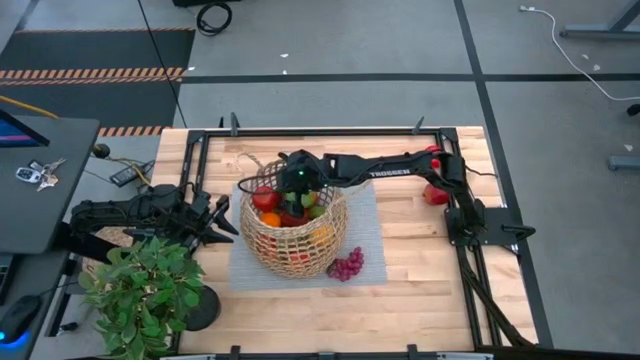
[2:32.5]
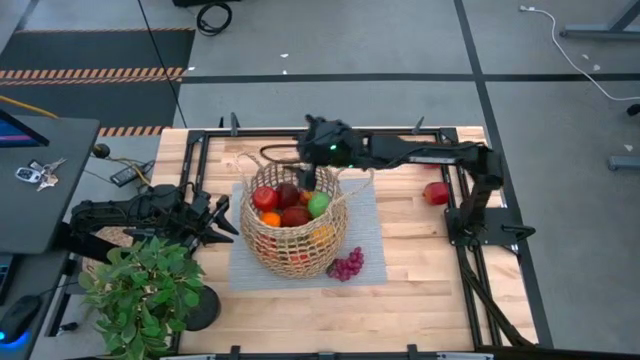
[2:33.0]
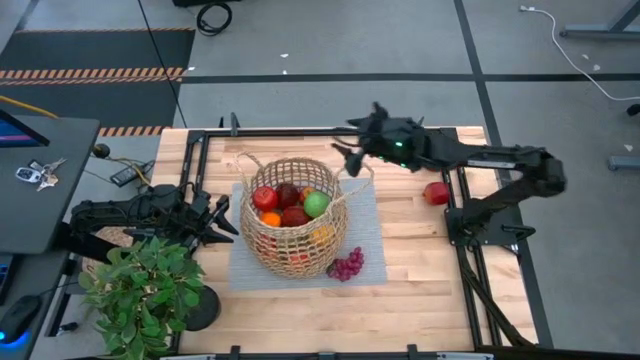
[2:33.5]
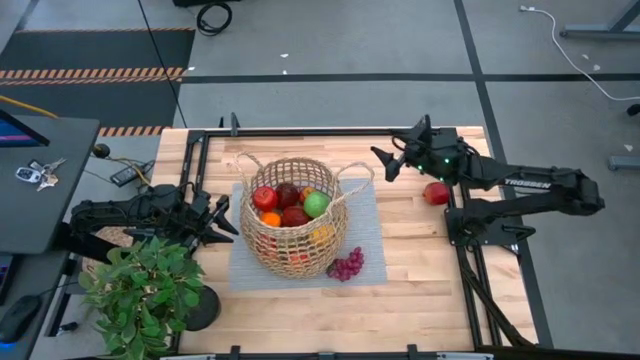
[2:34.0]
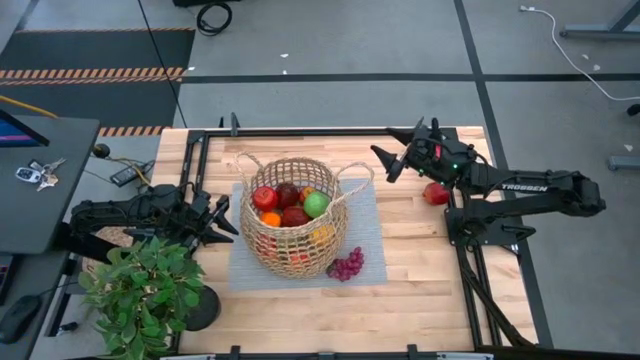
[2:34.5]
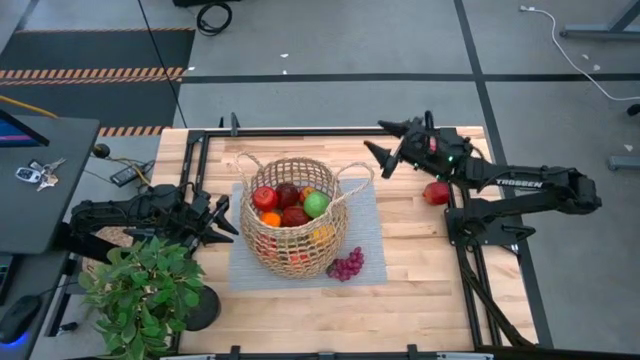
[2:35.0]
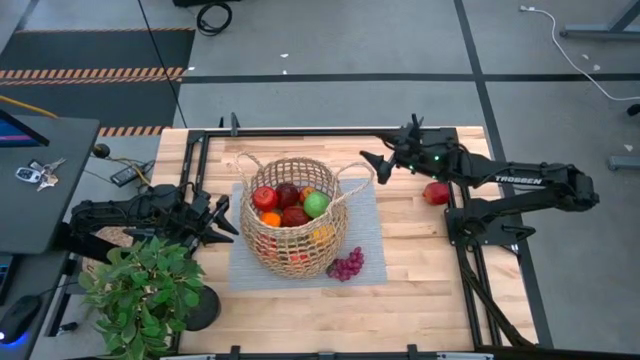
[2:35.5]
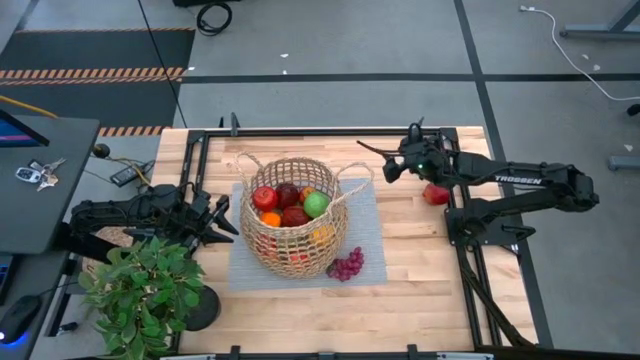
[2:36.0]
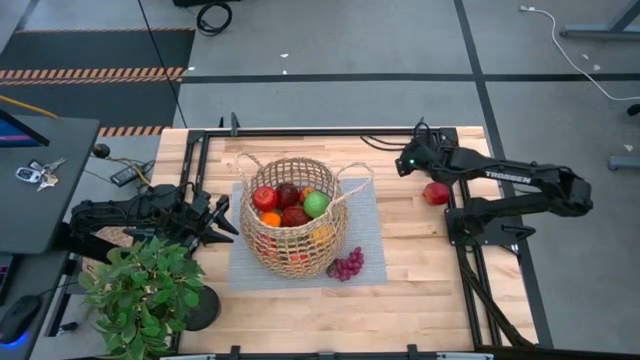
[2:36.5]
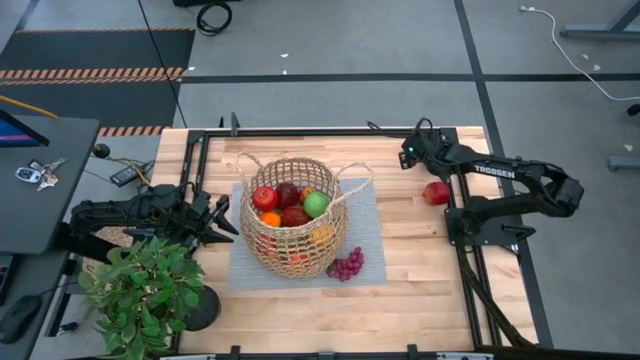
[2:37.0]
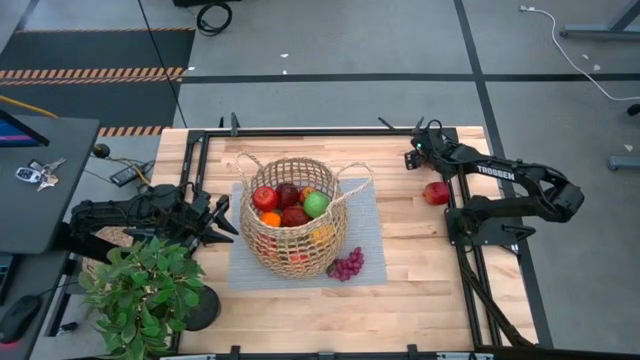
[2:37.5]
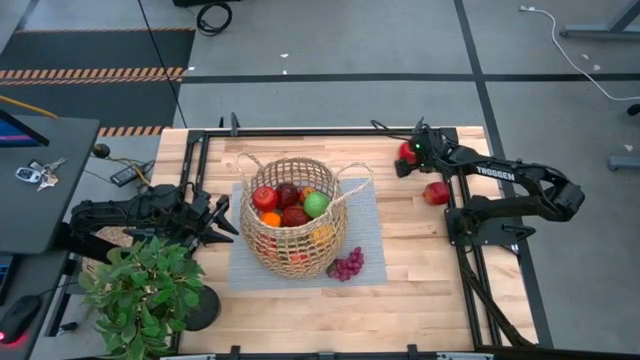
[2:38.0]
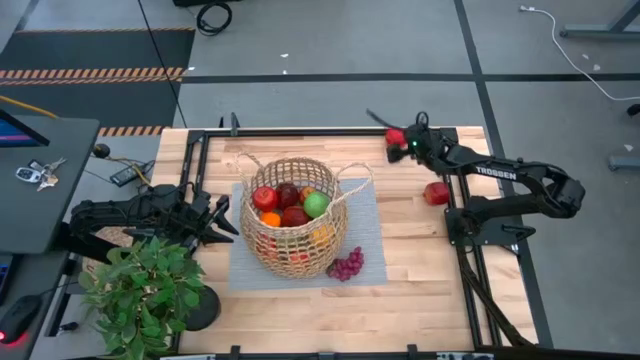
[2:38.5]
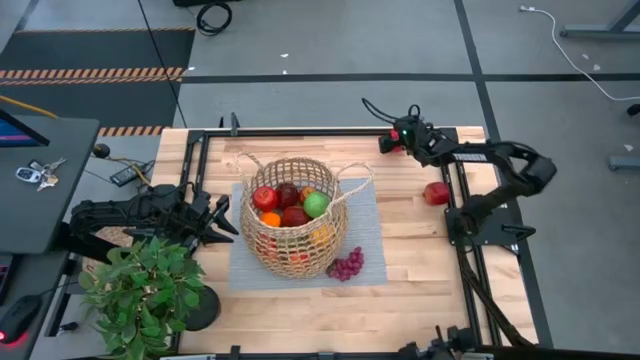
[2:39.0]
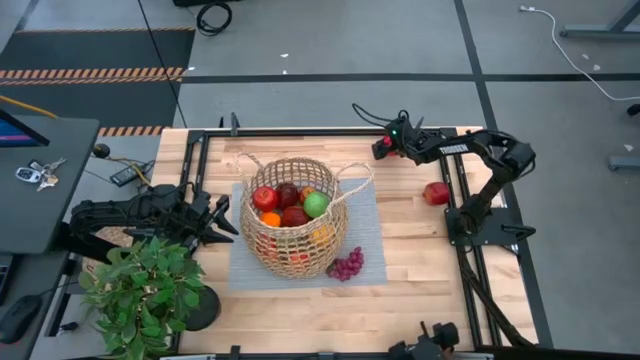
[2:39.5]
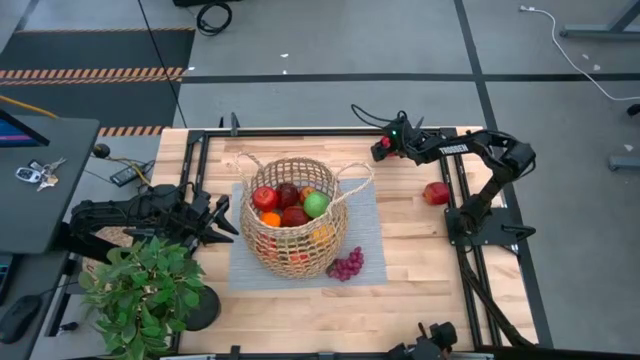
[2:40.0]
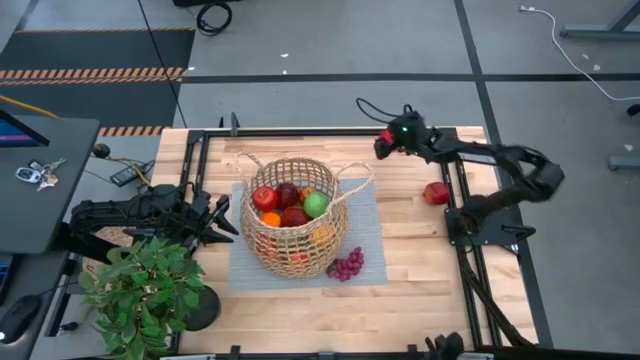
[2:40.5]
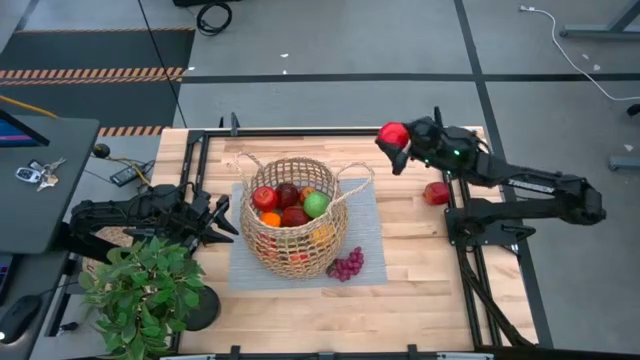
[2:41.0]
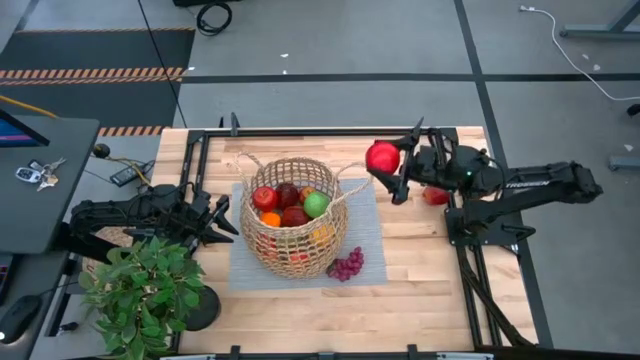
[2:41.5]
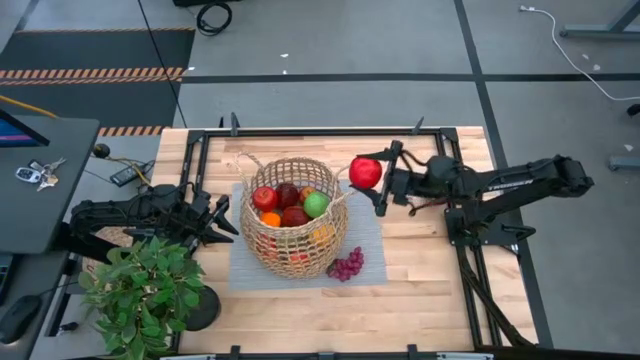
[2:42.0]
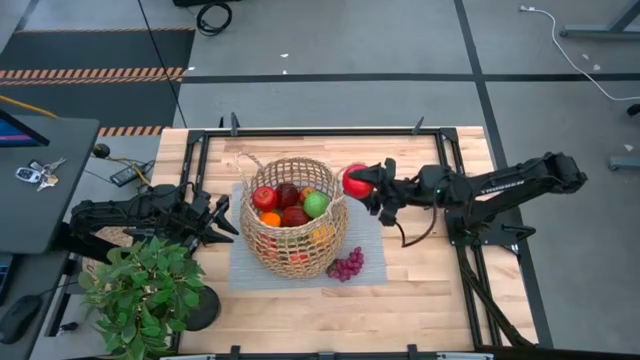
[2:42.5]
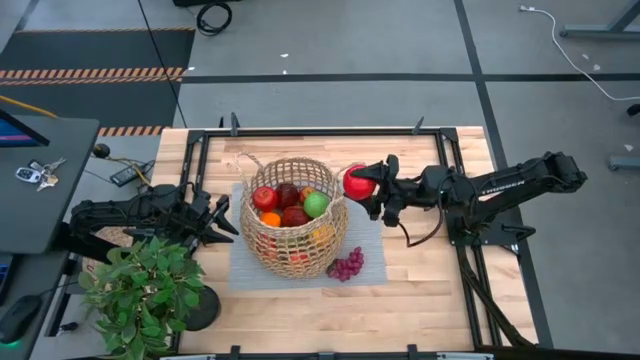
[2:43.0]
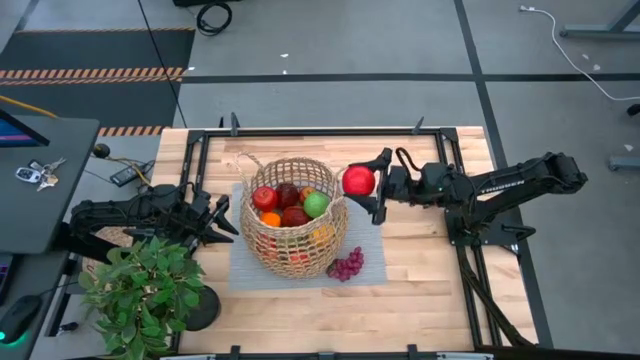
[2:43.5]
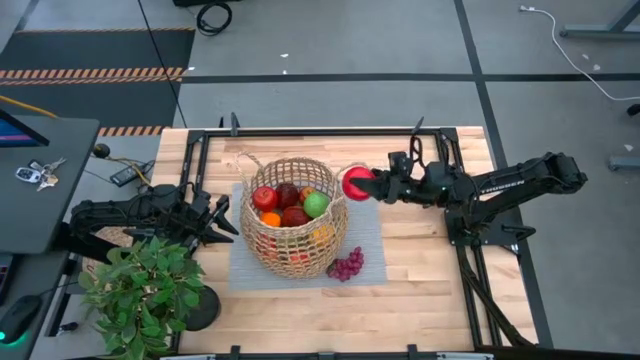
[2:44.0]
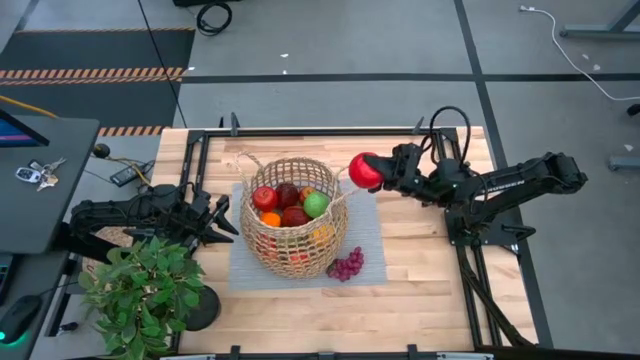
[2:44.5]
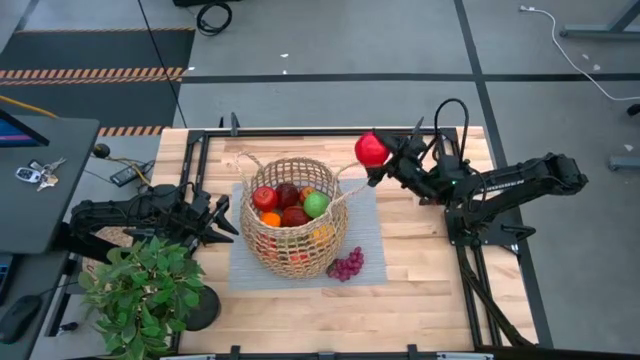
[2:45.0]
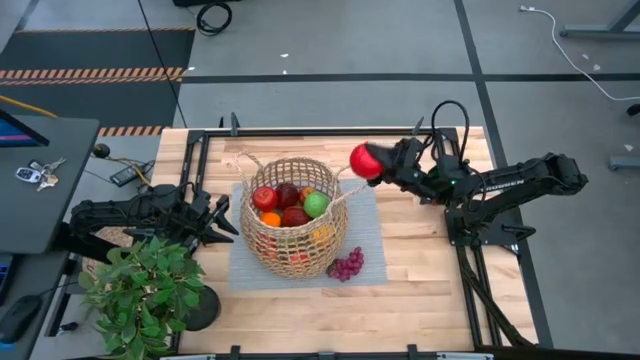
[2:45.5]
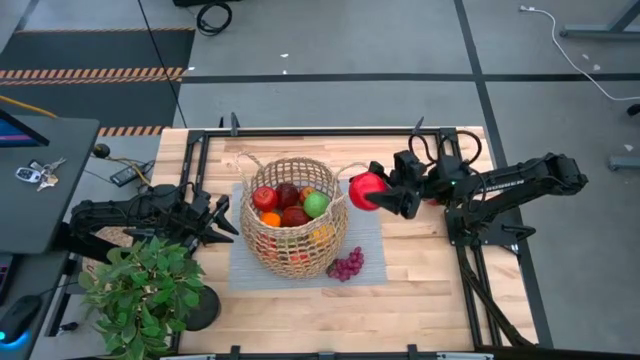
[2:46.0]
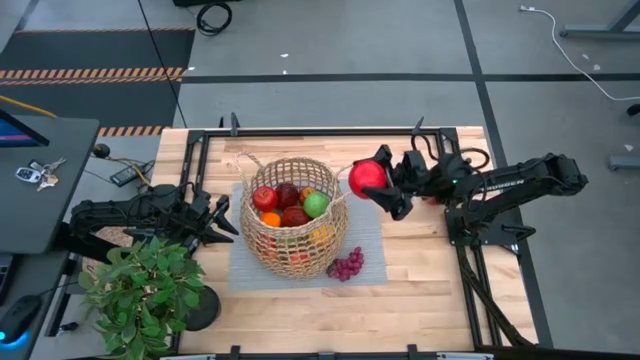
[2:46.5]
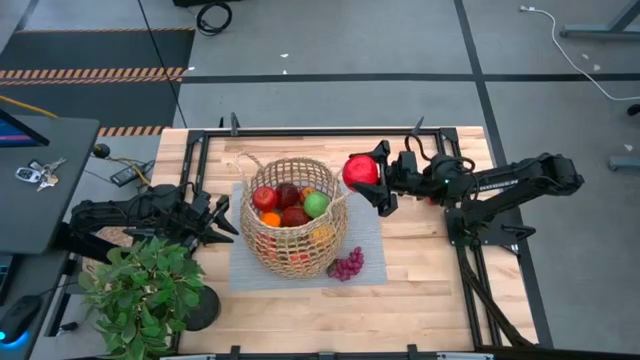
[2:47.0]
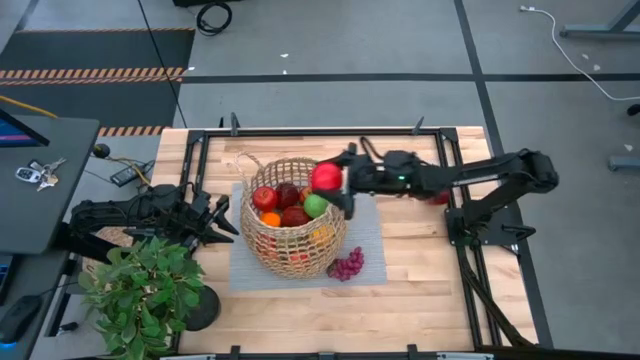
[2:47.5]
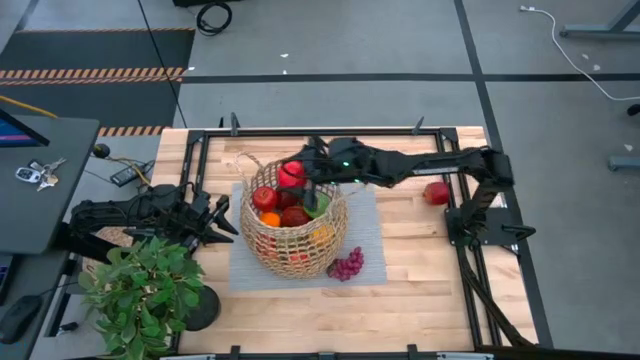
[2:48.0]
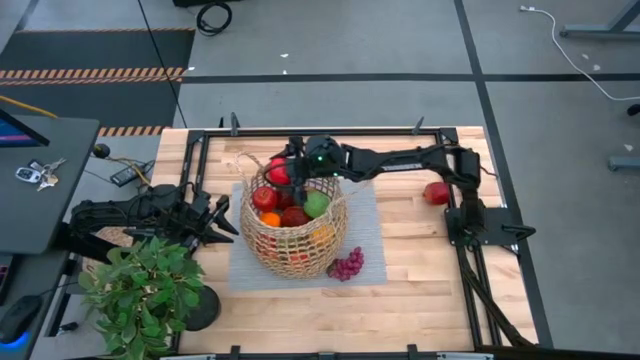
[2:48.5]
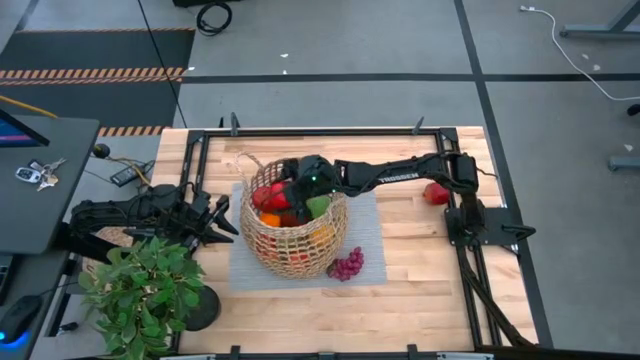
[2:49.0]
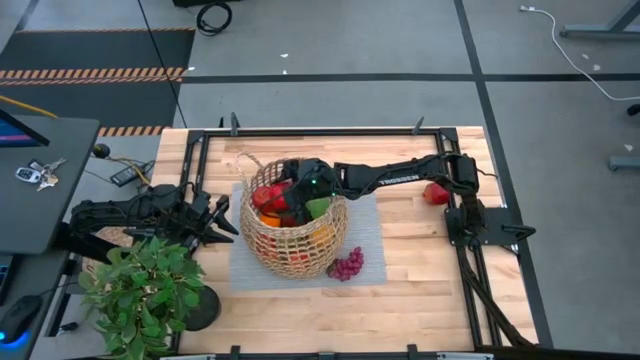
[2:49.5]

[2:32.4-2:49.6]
Task: Build produce basket
Put the red apple into the brown basket

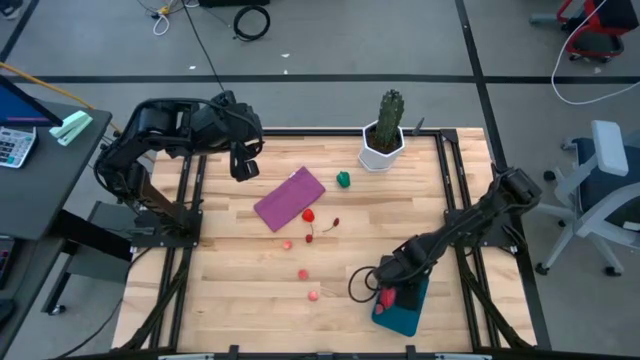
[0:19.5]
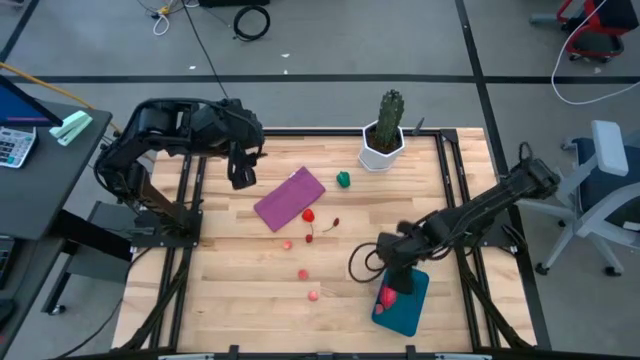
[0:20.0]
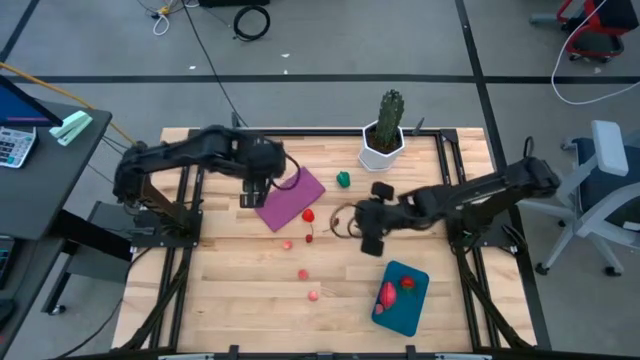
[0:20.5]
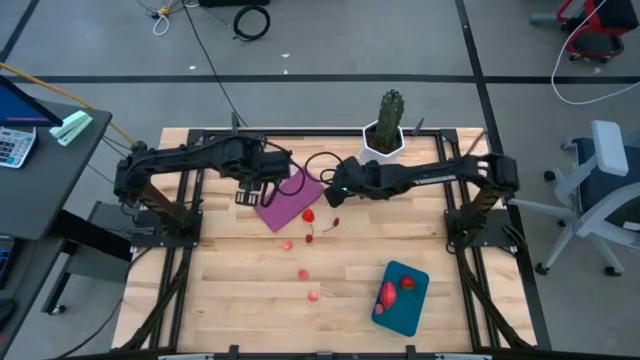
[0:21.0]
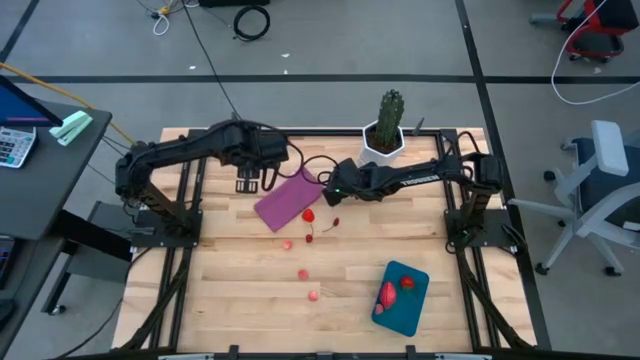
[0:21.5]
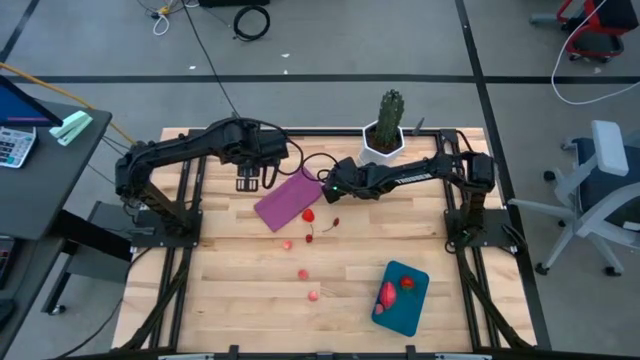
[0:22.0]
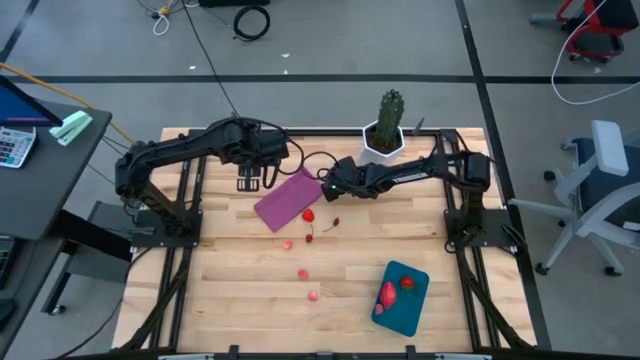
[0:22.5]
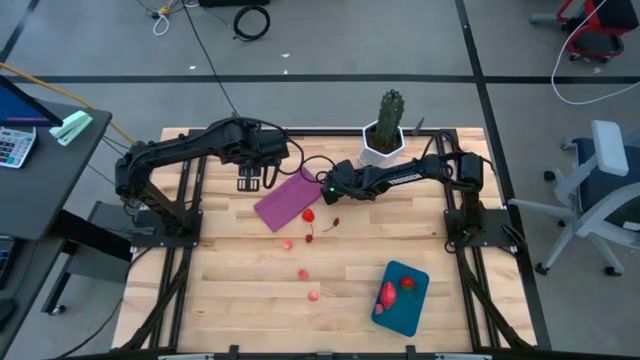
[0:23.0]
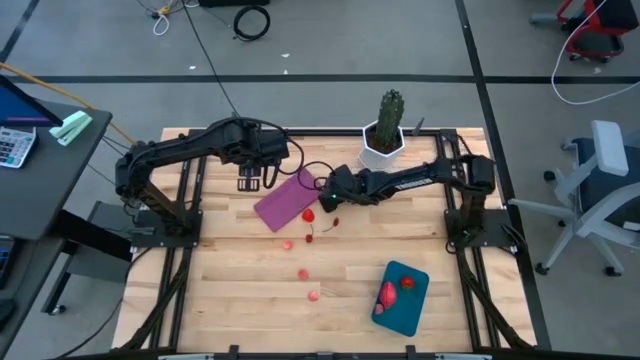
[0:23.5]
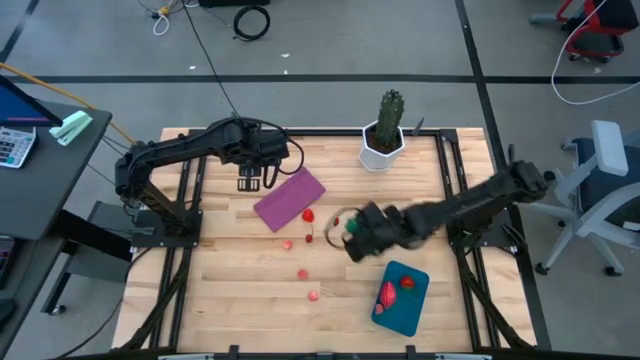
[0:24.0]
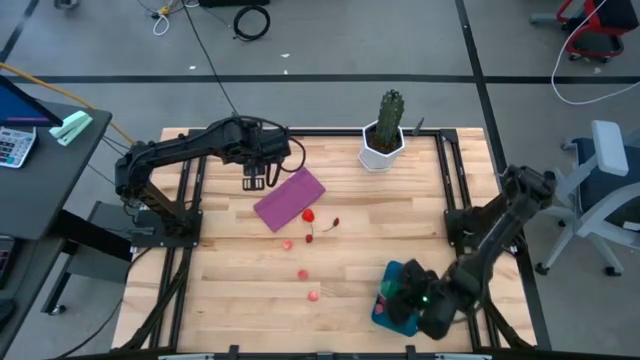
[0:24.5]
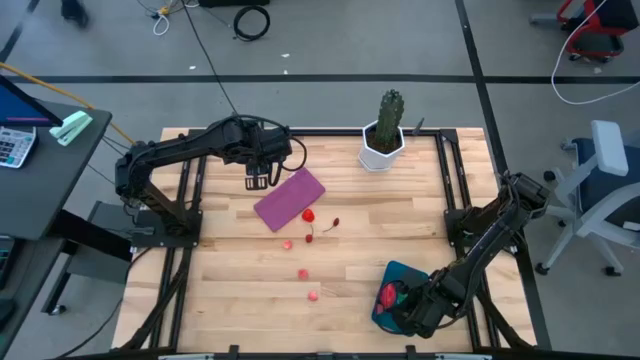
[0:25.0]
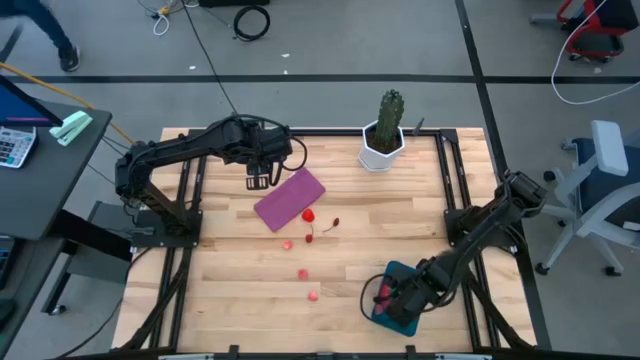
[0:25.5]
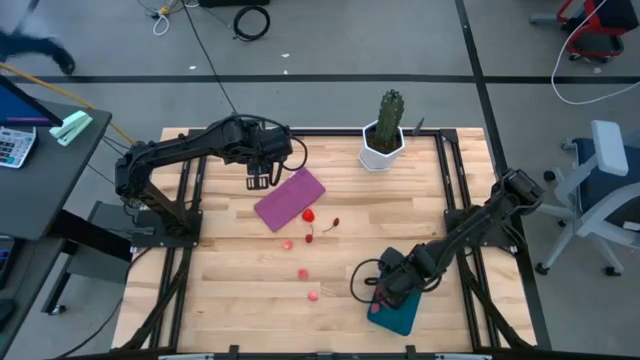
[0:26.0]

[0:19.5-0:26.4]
Task: Pick and placing Produce into tupperware
Put the green bell pepper into the blue bin
